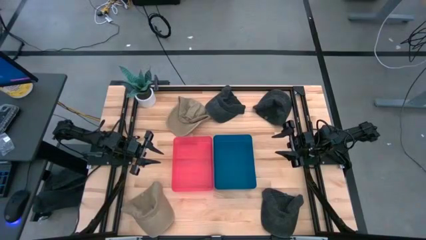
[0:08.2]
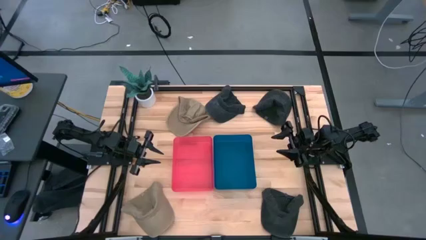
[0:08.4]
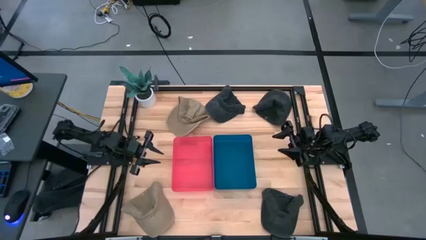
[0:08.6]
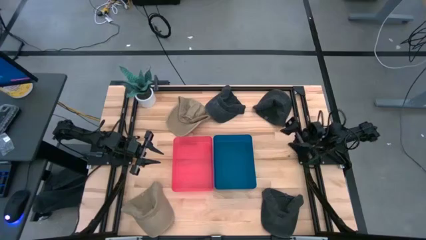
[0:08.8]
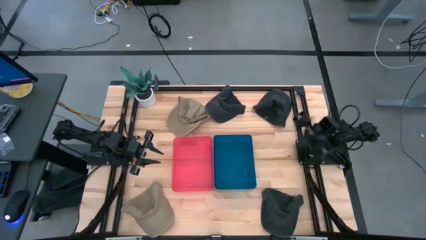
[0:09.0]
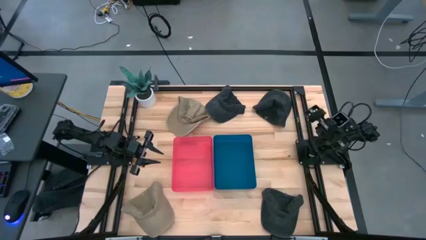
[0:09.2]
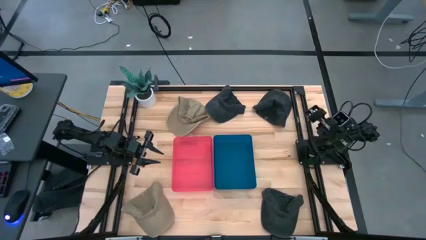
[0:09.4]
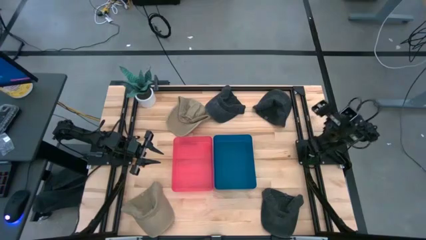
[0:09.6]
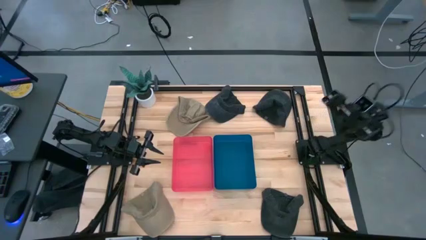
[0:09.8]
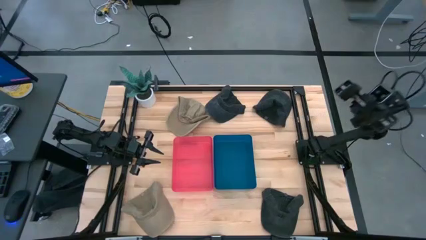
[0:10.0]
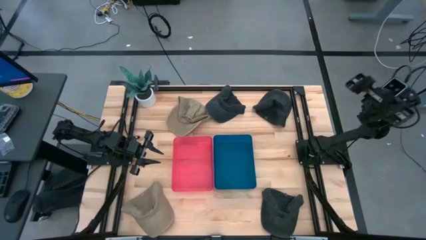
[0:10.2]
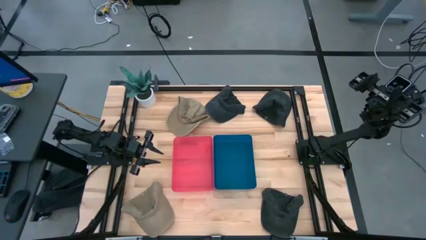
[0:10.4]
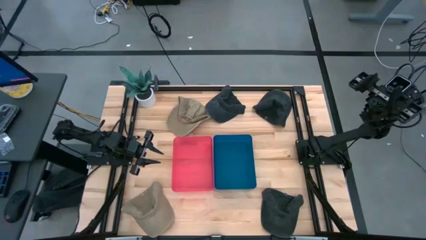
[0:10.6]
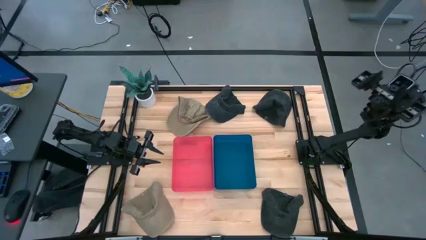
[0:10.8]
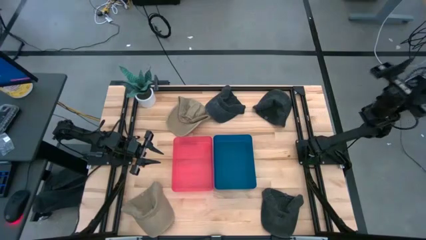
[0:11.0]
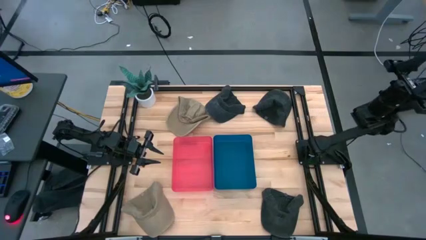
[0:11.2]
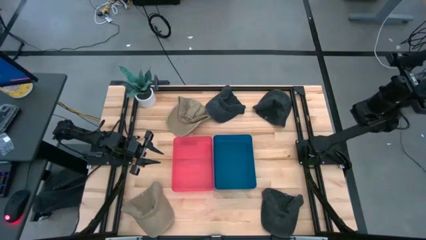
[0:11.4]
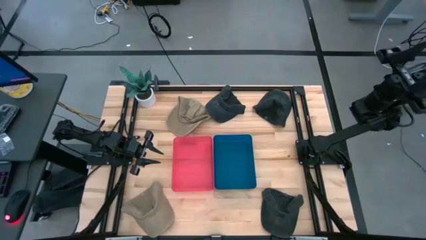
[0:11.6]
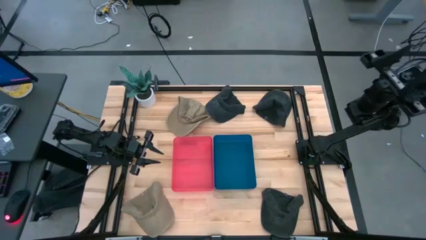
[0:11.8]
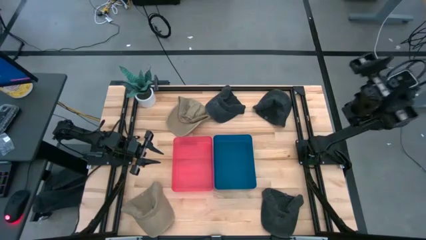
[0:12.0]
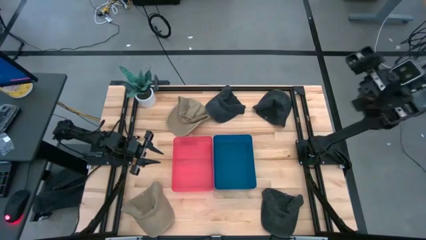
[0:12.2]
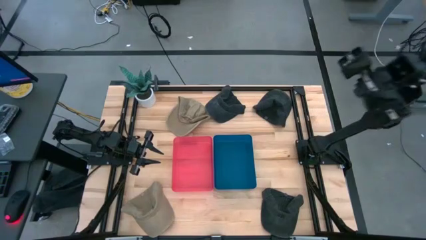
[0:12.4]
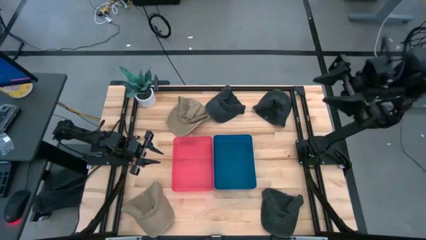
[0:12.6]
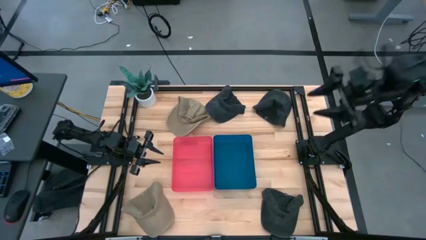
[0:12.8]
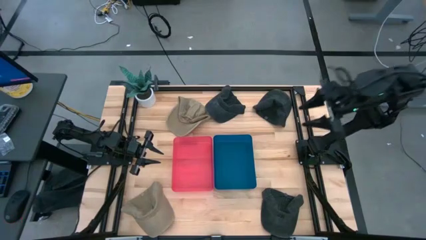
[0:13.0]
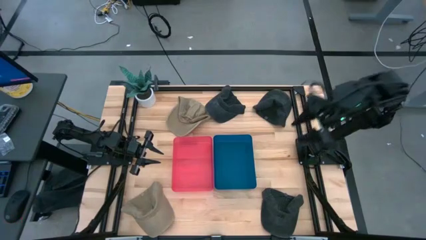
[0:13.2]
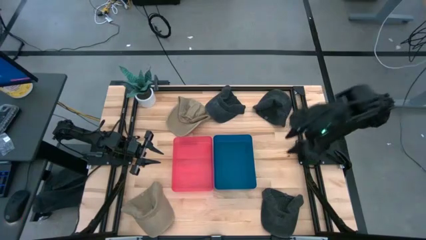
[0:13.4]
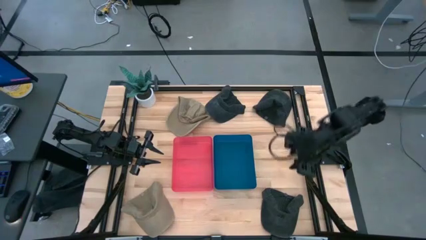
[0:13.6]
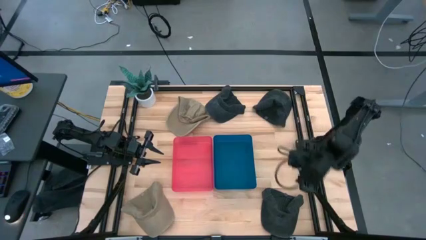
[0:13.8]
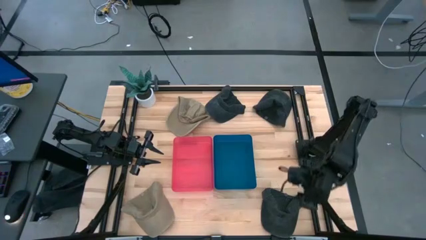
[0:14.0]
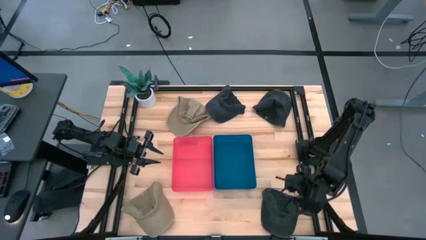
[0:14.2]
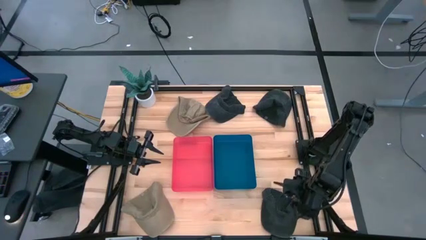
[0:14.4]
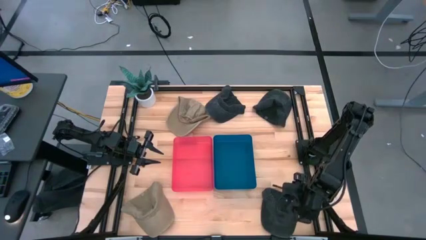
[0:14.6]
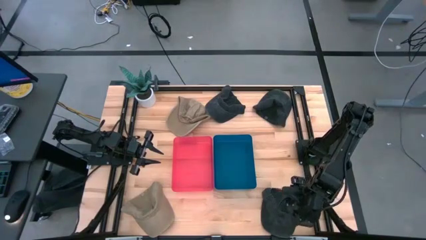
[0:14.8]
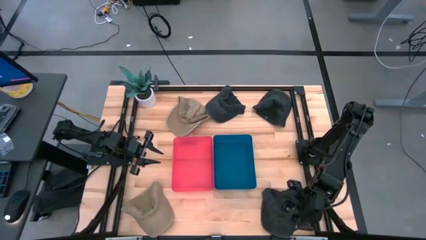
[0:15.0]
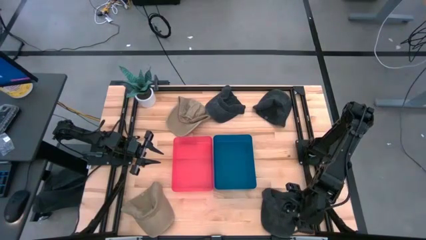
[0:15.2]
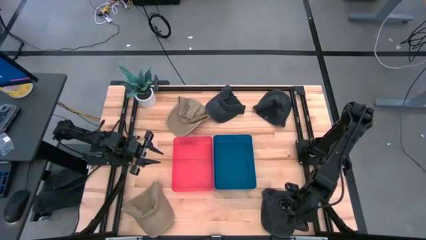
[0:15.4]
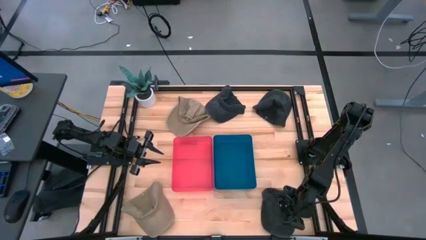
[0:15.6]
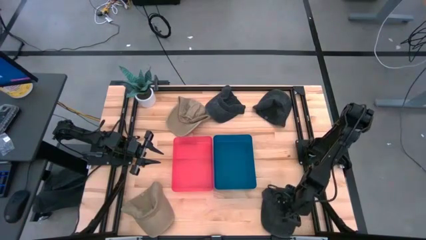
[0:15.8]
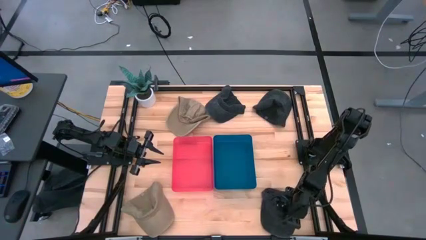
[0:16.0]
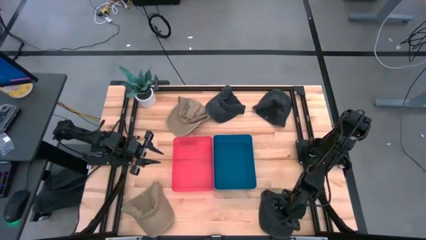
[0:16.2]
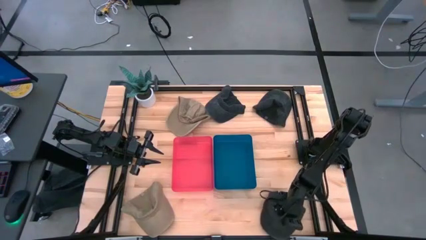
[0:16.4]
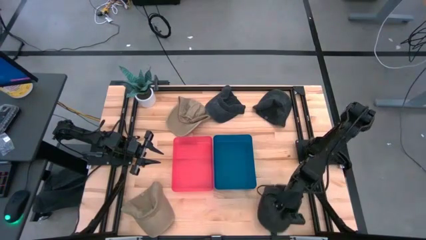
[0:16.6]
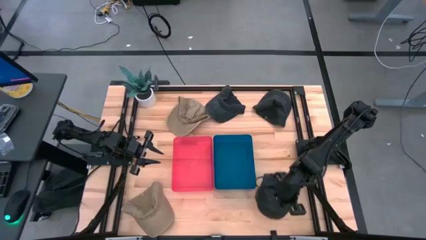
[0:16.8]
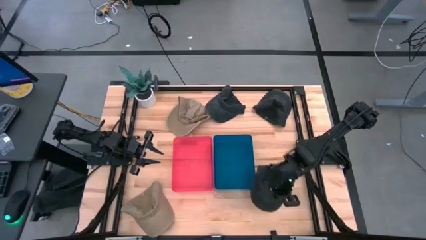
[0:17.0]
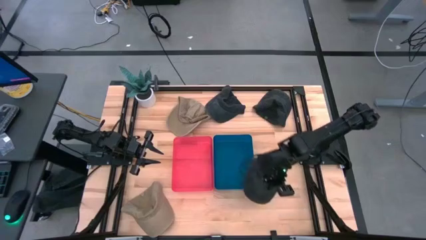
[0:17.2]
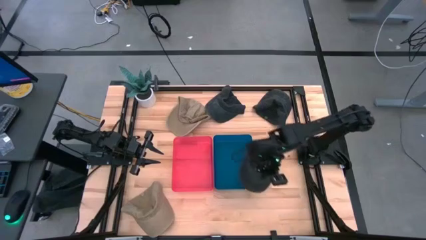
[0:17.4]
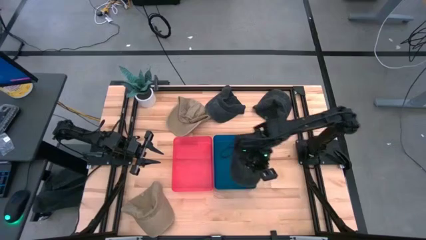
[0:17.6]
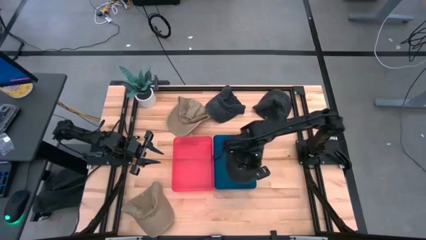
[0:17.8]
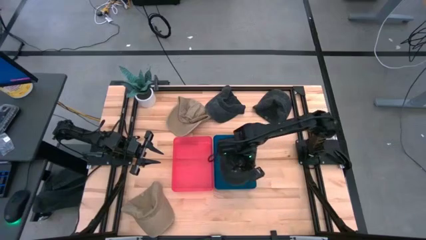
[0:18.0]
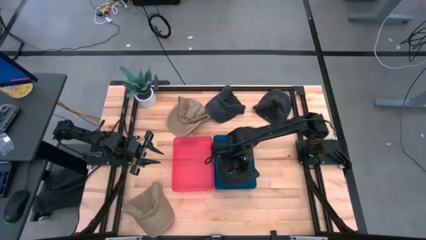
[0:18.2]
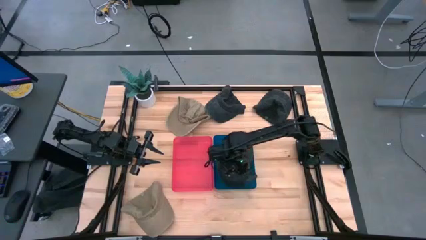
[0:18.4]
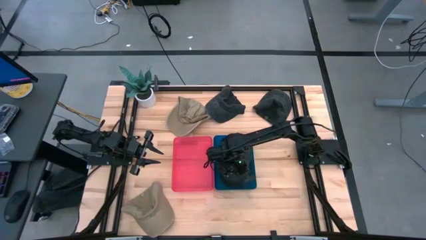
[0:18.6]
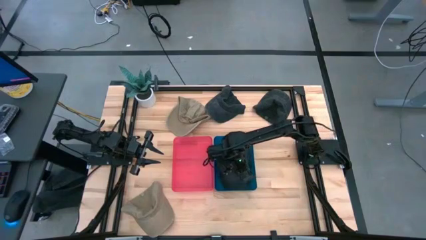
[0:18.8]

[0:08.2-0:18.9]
Task: Pick & Place hat
Put the bottom right black cap into the blue bin

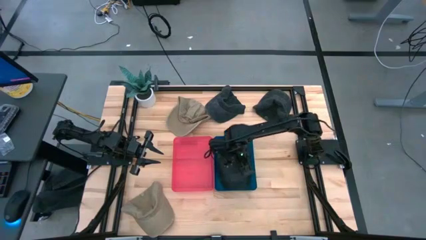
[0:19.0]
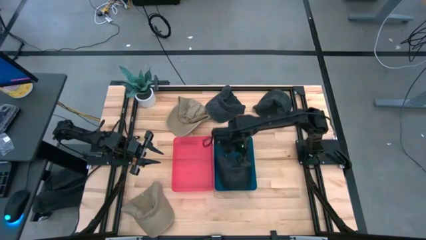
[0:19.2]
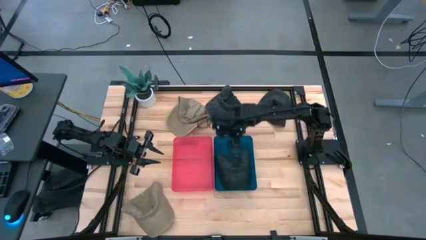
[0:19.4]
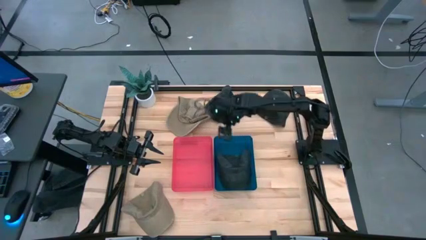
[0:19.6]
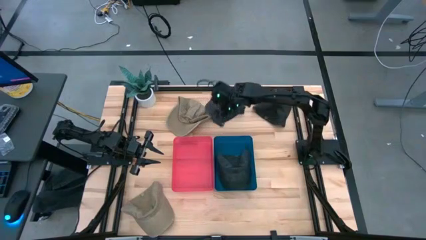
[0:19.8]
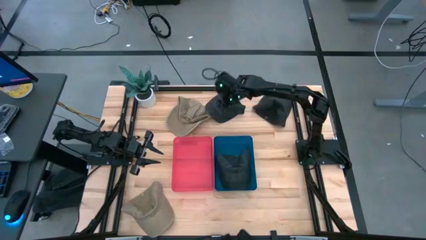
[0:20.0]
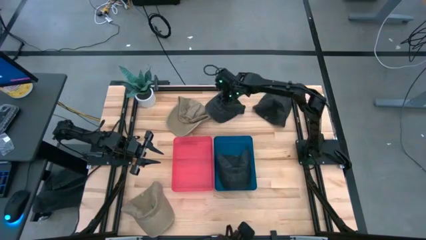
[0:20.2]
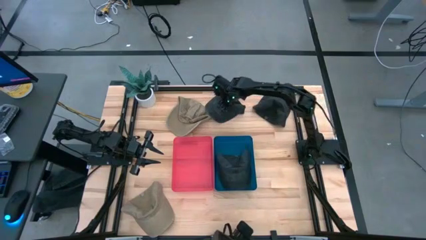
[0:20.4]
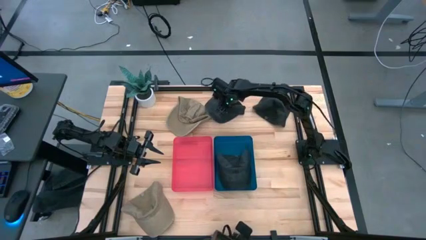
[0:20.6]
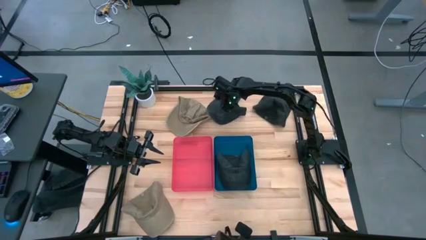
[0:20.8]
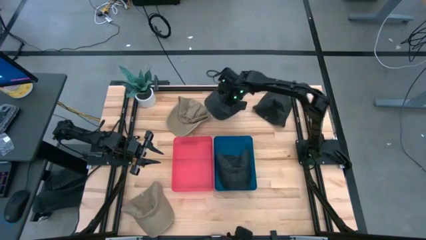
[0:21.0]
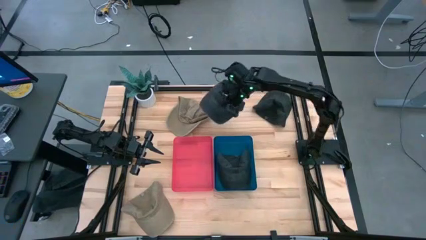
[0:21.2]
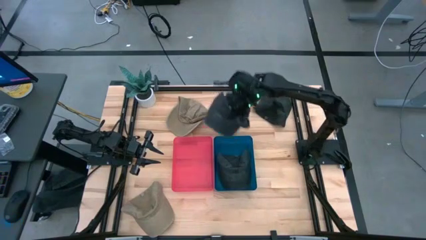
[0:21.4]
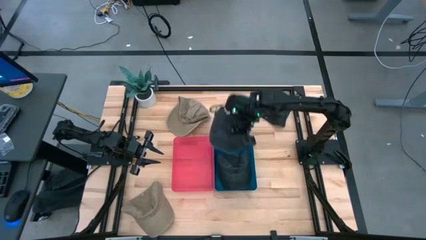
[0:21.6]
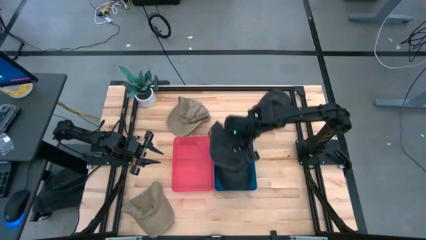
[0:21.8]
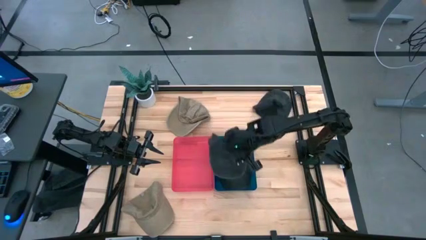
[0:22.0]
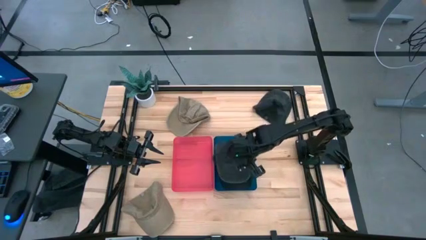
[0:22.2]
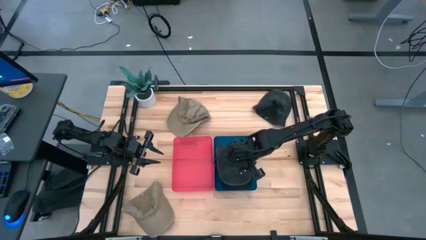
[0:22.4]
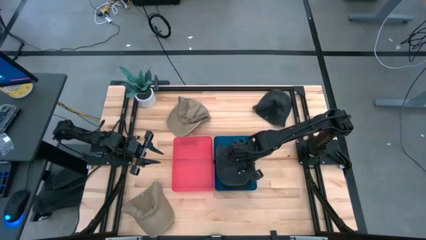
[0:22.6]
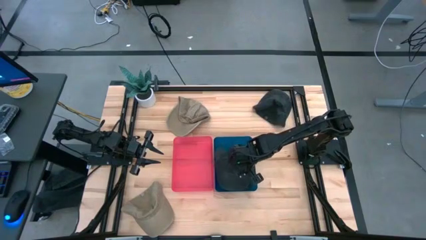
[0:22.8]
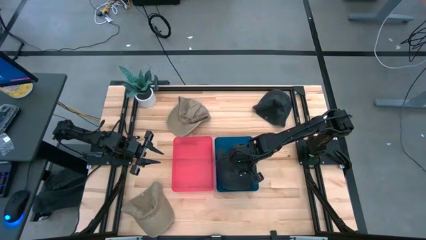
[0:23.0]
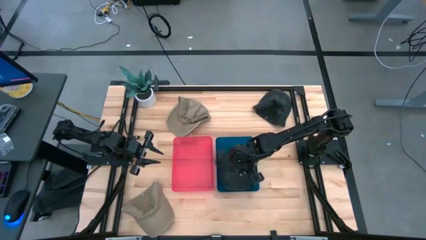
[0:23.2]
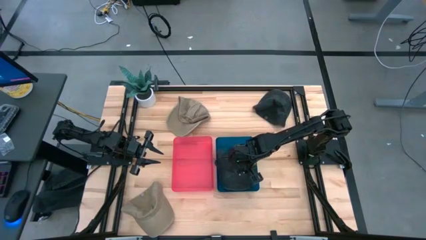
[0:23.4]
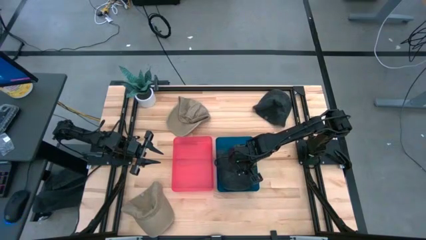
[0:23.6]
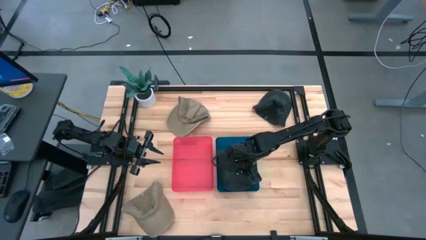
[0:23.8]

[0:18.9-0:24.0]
Put the left black cap into the blue bin

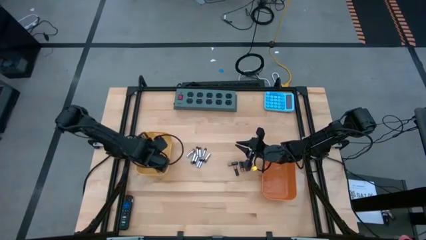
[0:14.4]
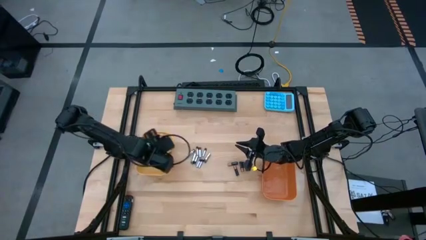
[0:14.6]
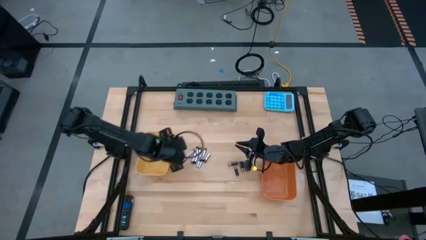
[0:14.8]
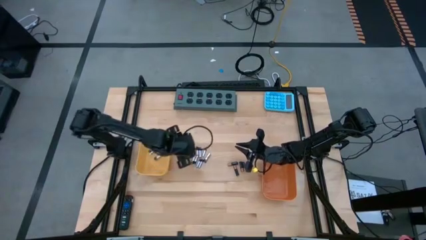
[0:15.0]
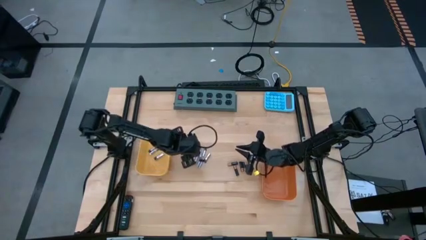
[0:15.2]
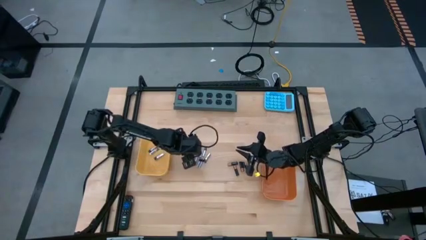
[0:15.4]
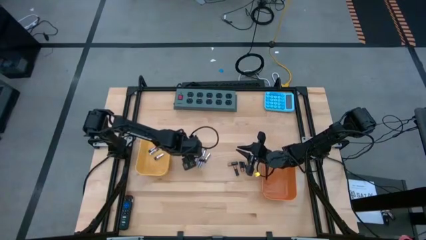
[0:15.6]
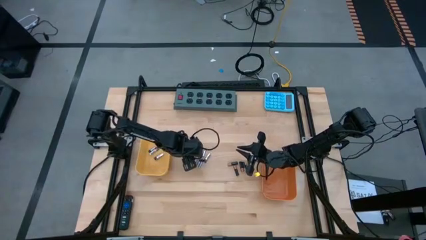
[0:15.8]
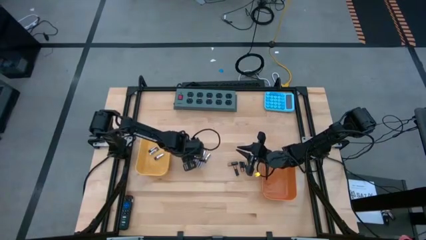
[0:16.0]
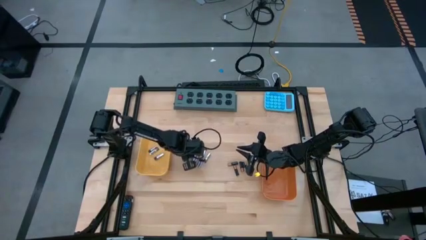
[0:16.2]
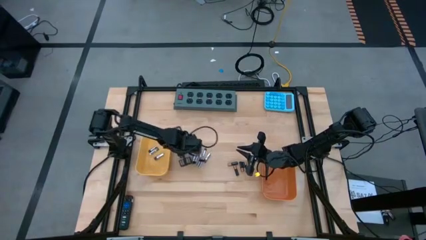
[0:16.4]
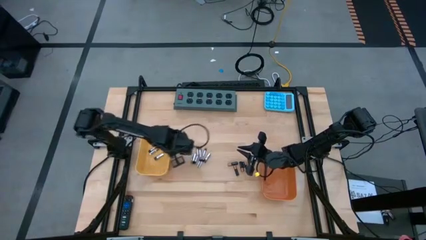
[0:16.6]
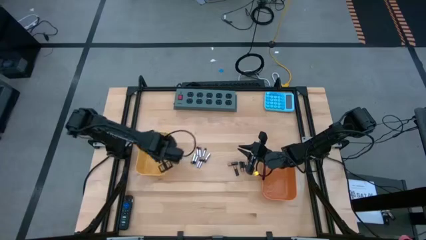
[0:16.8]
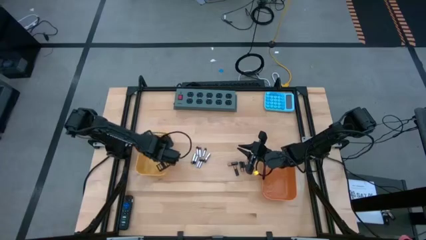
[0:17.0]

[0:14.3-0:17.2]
Task: Sort batteries
Put the silver battery into the yellow bin
